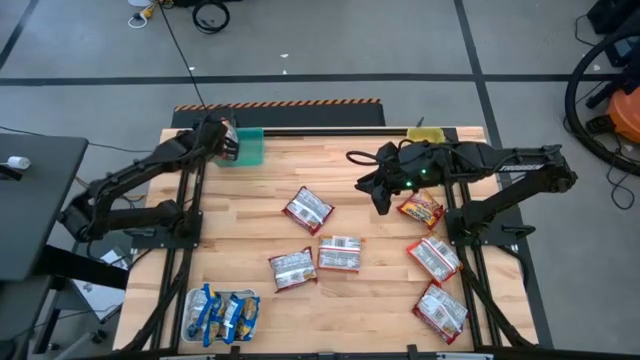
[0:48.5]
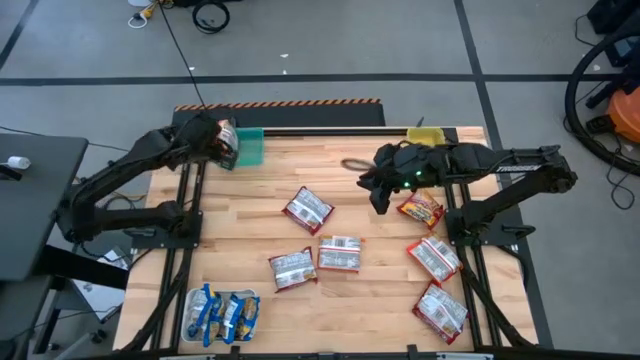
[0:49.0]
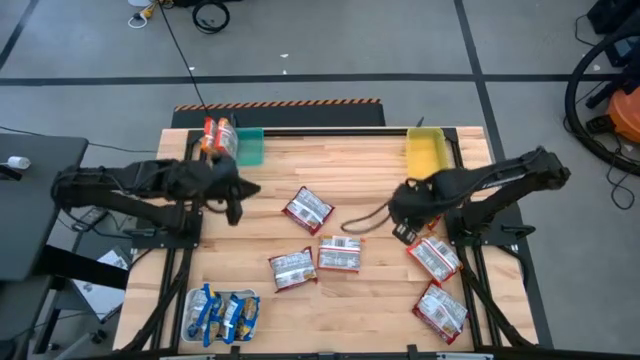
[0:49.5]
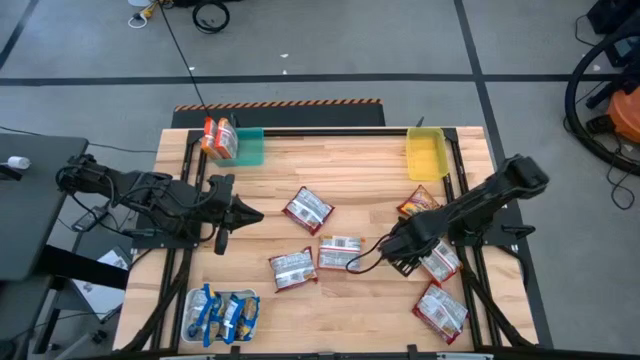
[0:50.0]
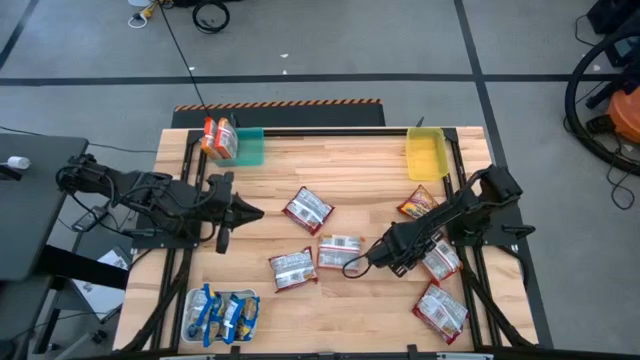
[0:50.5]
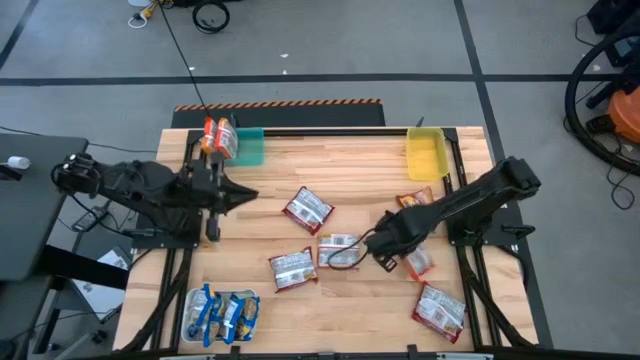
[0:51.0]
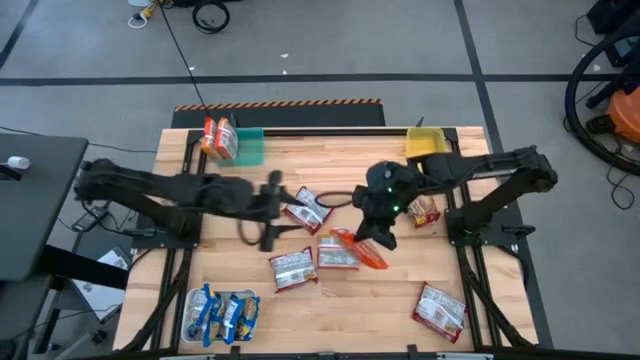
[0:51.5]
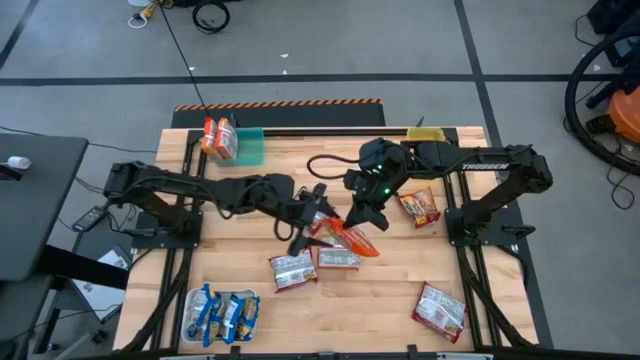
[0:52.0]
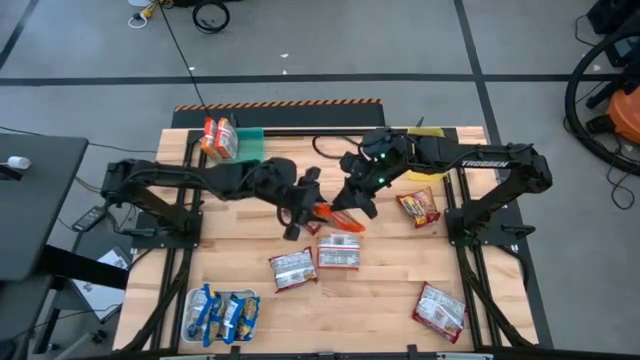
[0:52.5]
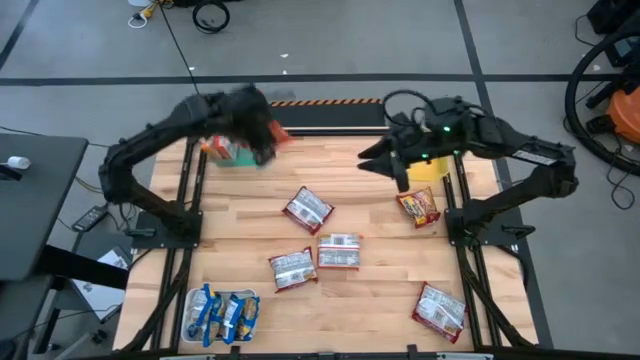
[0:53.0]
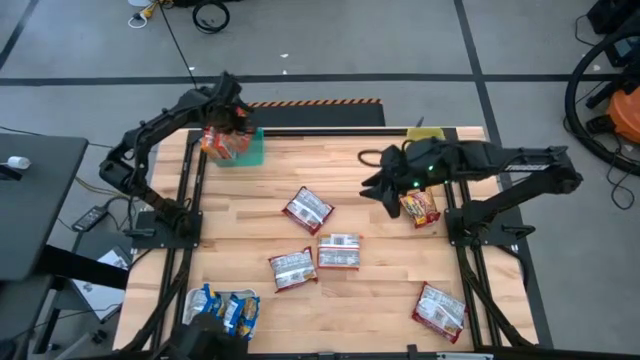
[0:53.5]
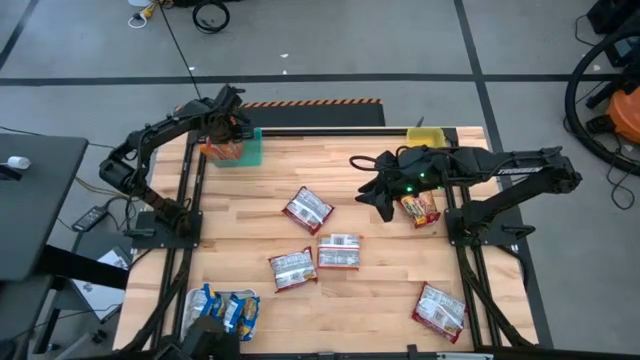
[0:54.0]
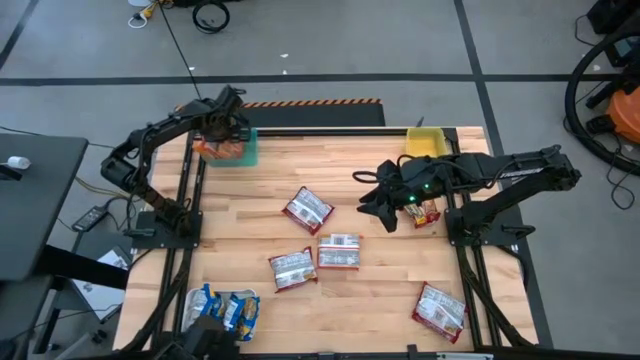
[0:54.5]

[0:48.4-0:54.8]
Task: Sort Maruchan noodles
Put the orange noodle pack into the green bin

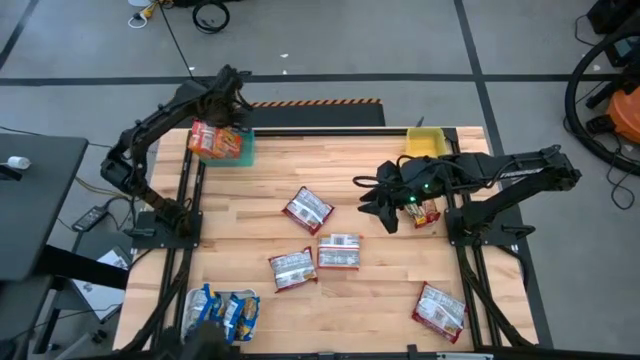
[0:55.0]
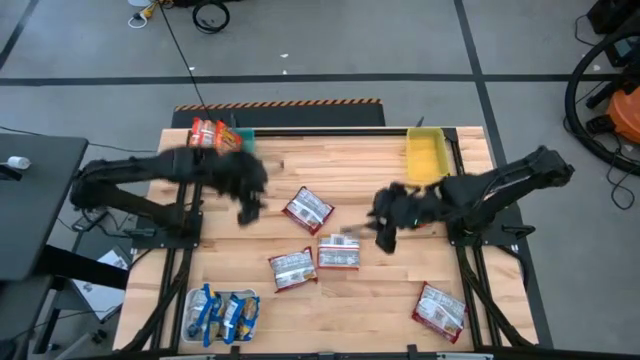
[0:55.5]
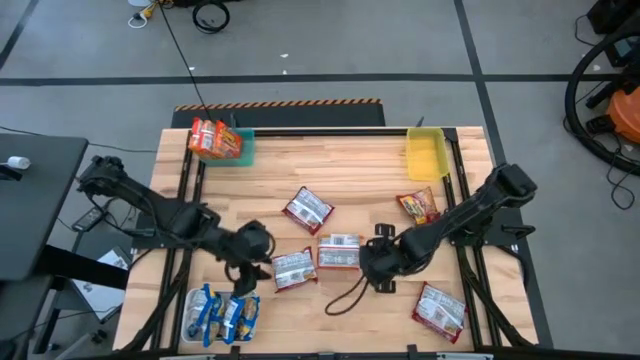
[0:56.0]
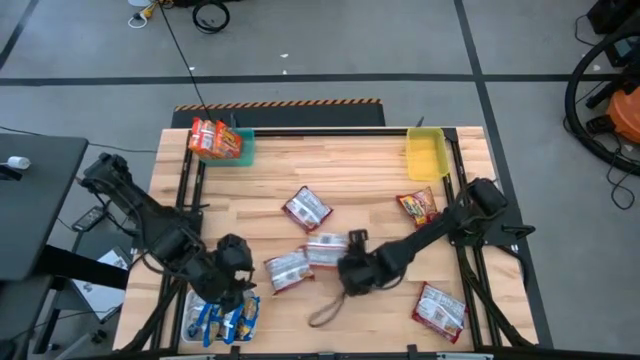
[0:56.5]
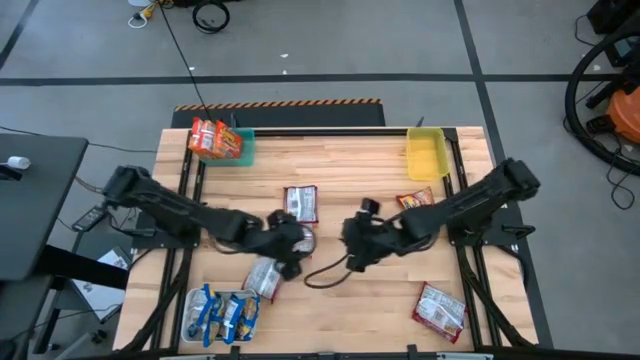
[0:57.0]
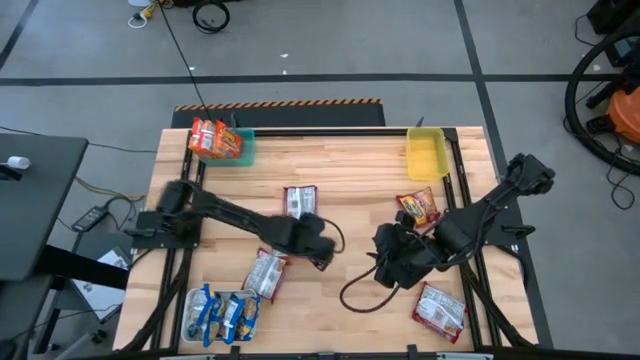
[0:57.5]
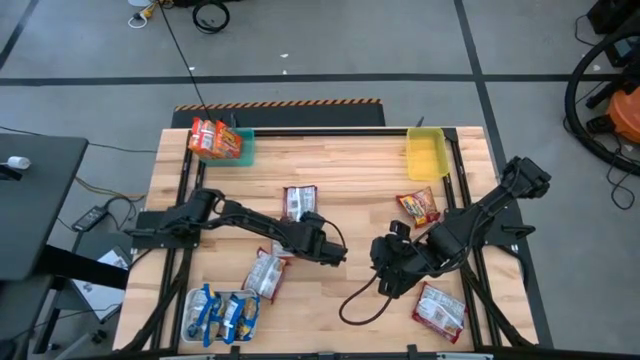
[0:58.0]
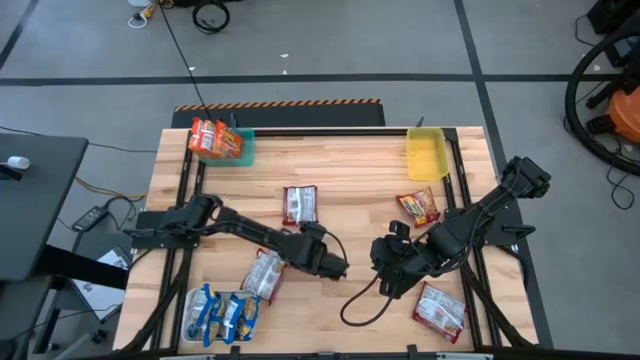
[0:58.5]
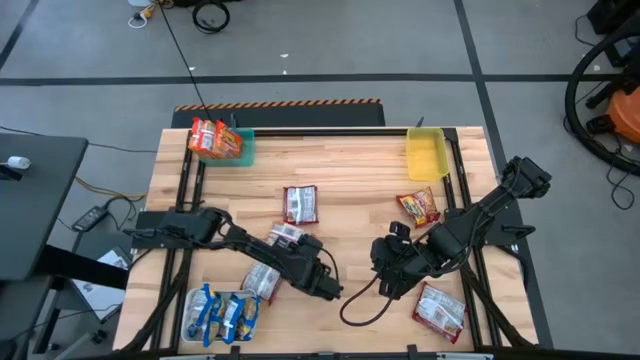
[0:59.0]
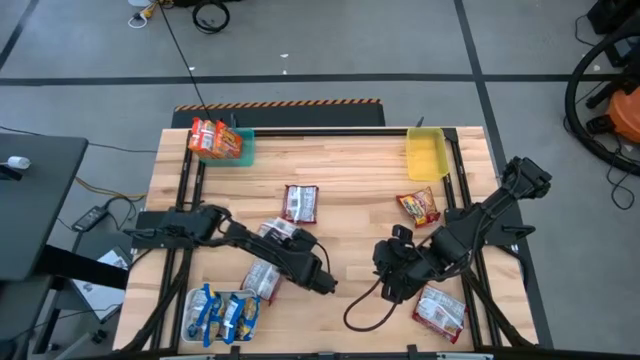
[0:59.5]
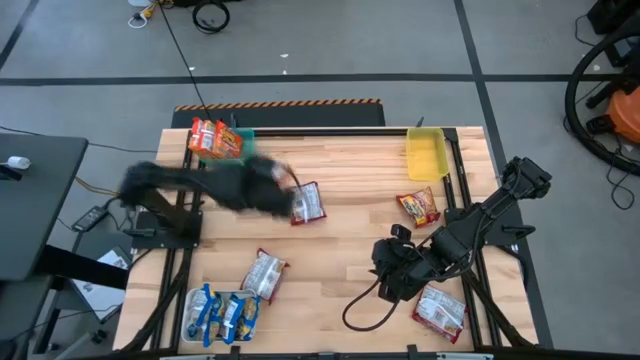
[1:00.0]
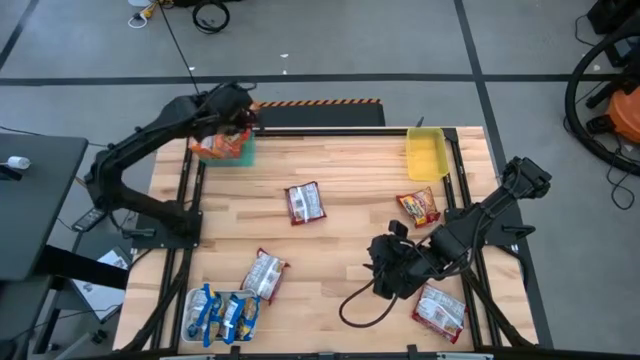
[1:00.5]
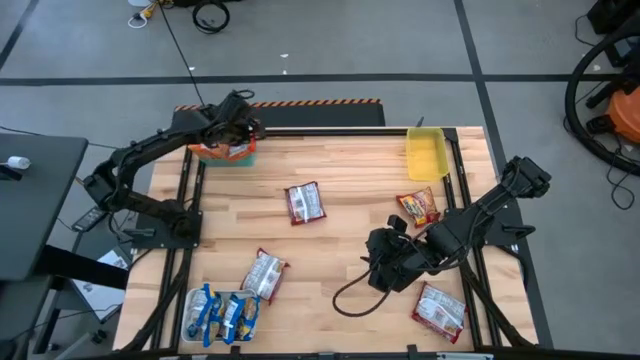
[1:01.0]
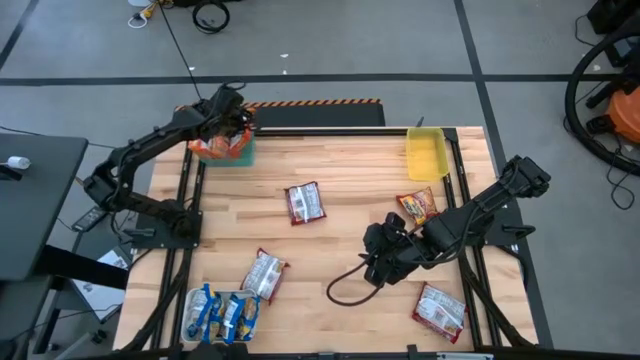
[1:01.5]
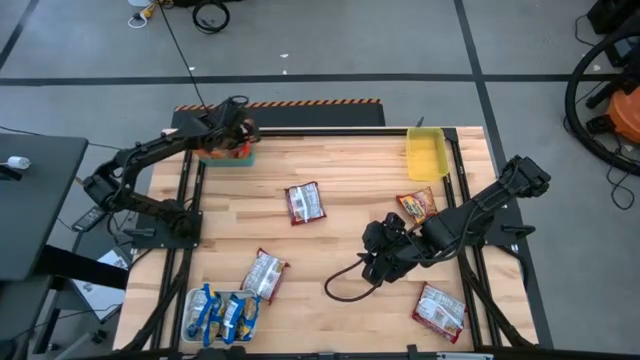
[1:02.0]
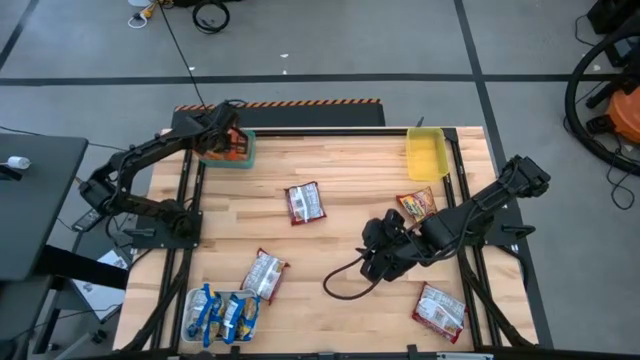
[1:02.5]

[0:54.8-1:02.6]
Put the orange noodle pack into the green bin

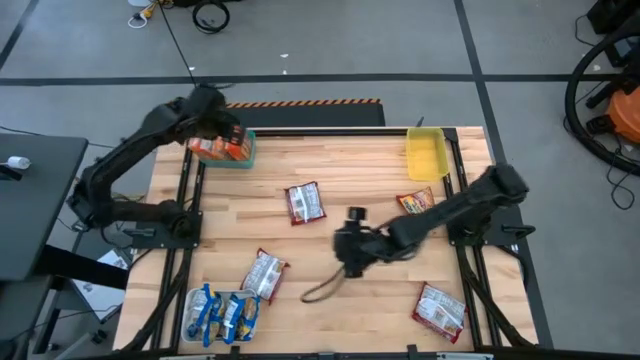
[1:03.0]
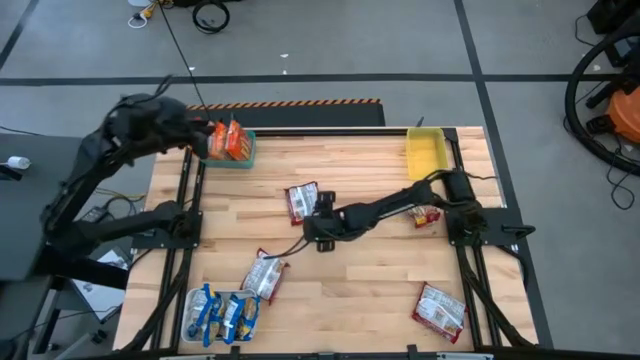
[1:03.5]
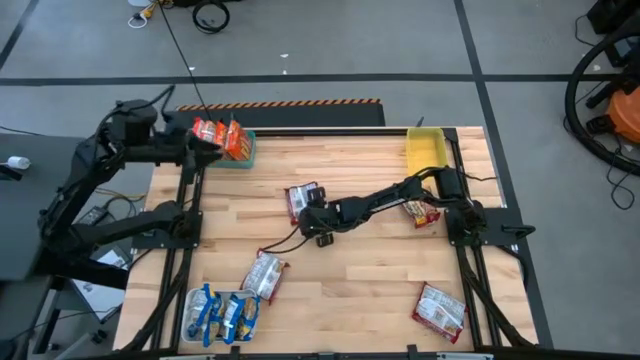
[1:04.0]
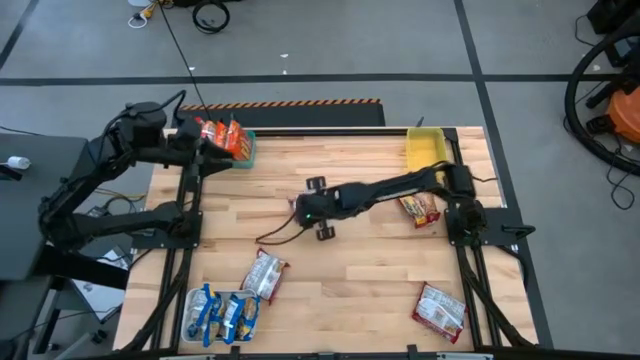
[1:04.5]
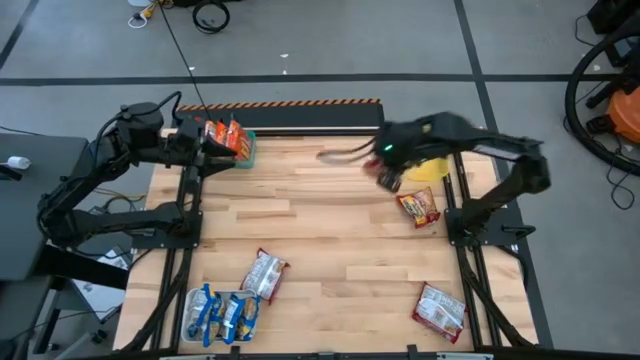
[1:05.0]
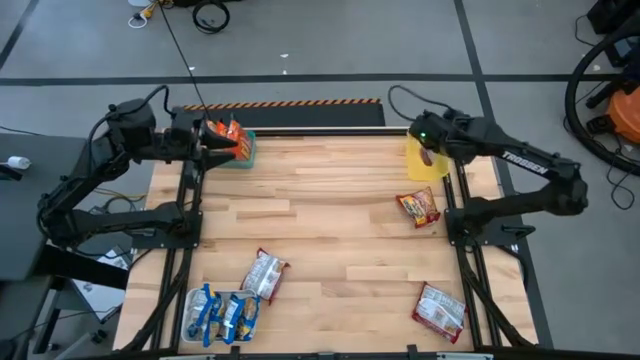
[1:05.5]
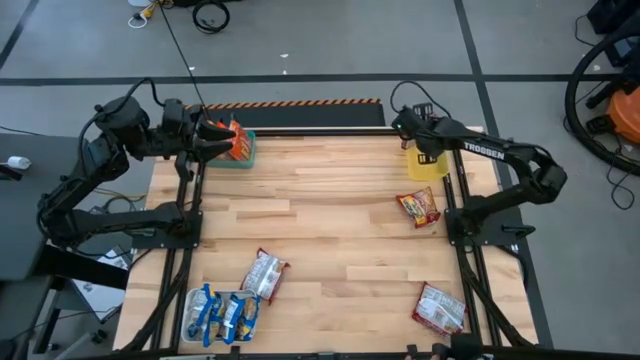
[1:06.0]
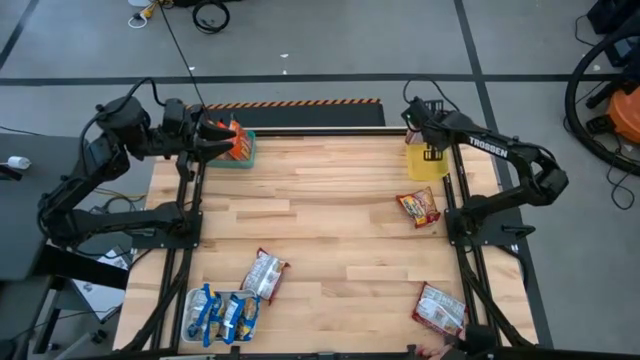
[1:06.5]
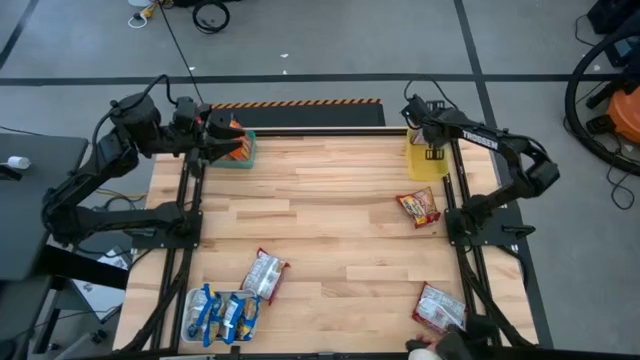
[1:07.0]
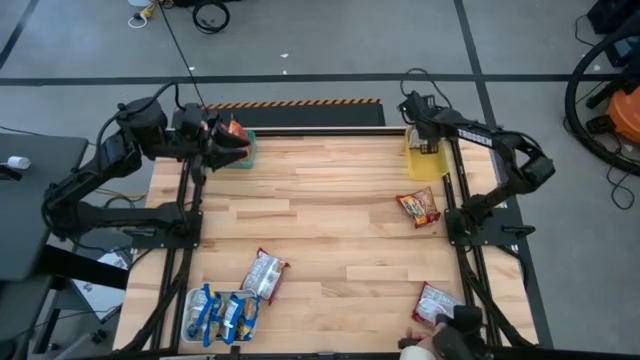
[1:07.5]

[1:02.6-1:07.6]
Put the red noodle pack into the yellow bin
